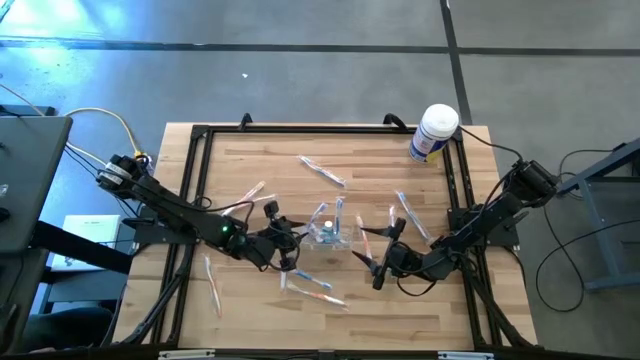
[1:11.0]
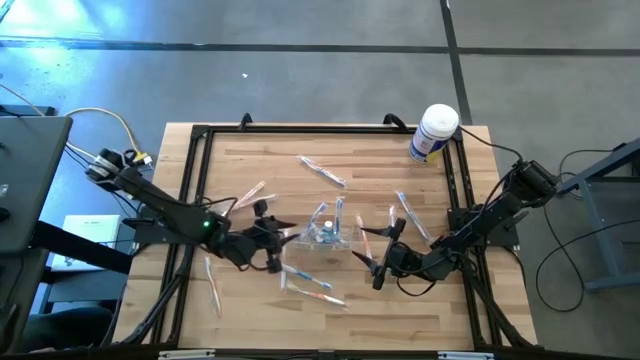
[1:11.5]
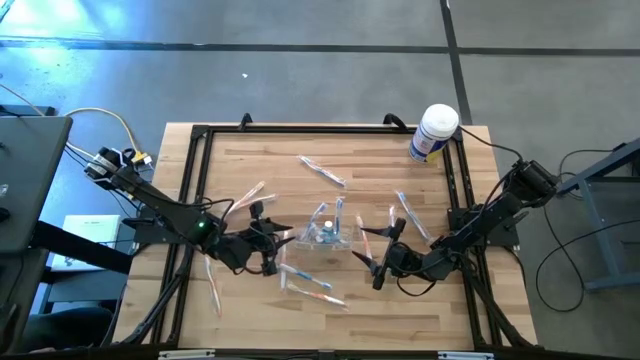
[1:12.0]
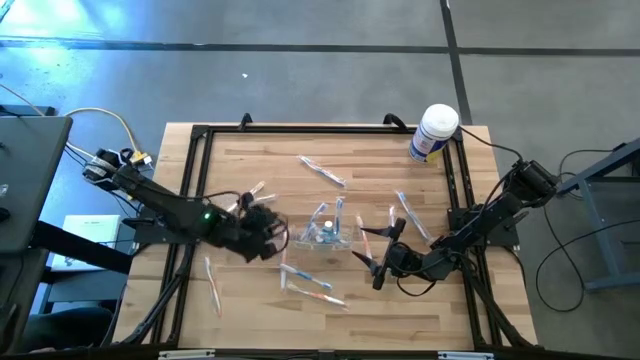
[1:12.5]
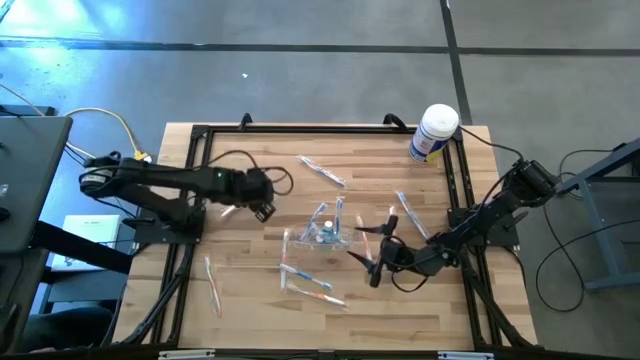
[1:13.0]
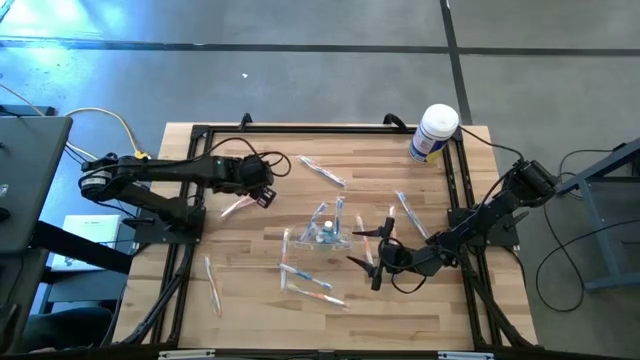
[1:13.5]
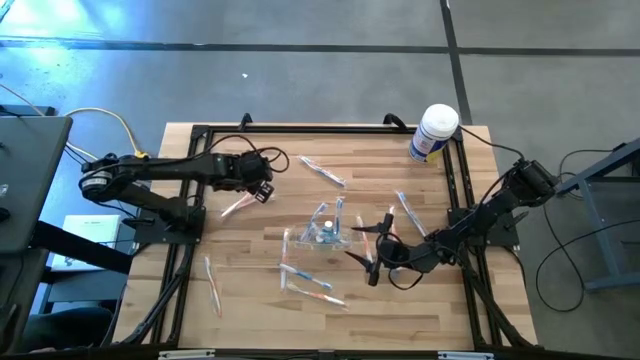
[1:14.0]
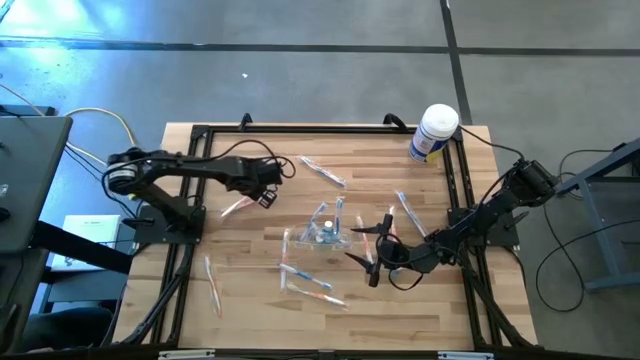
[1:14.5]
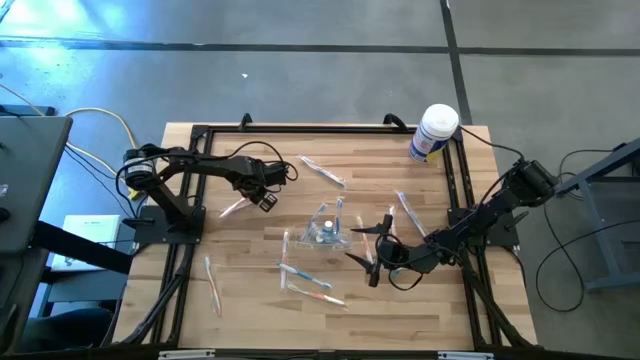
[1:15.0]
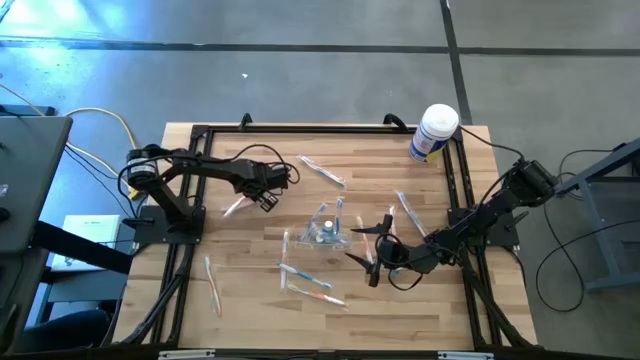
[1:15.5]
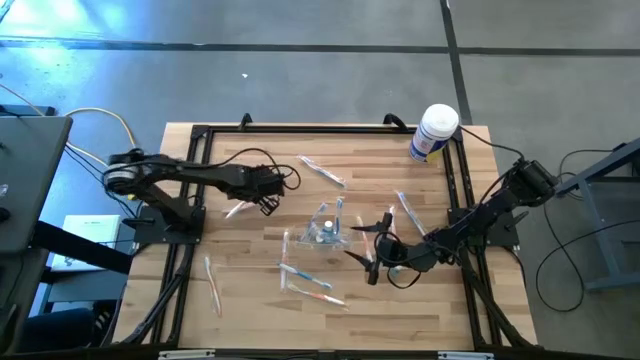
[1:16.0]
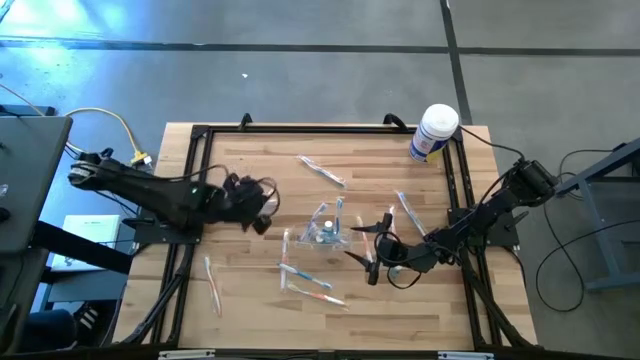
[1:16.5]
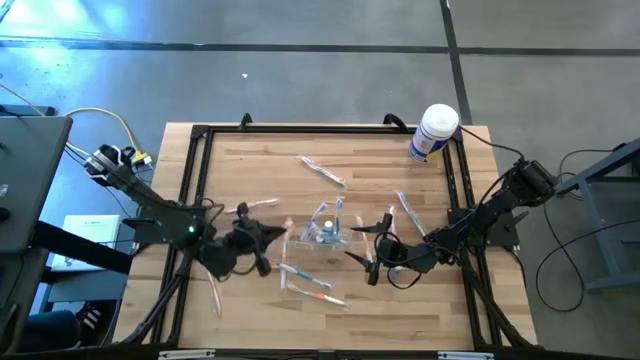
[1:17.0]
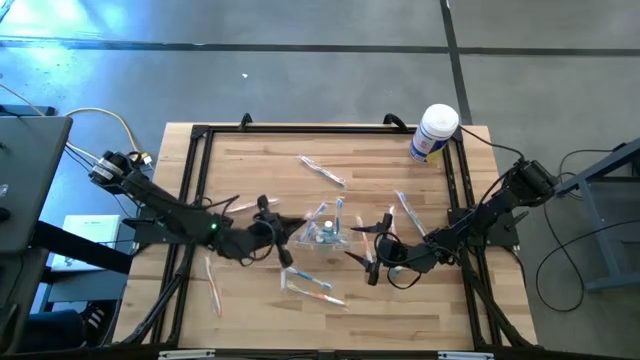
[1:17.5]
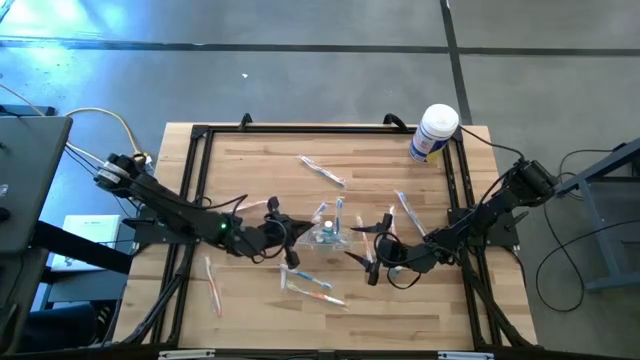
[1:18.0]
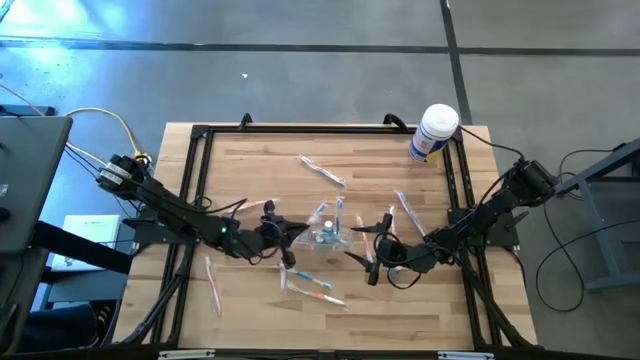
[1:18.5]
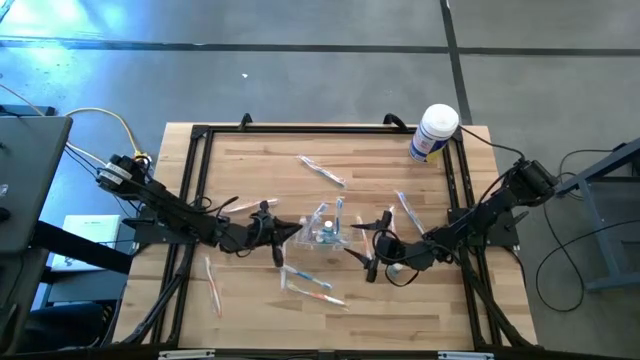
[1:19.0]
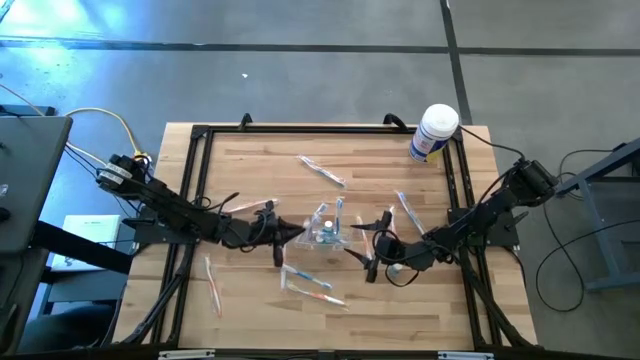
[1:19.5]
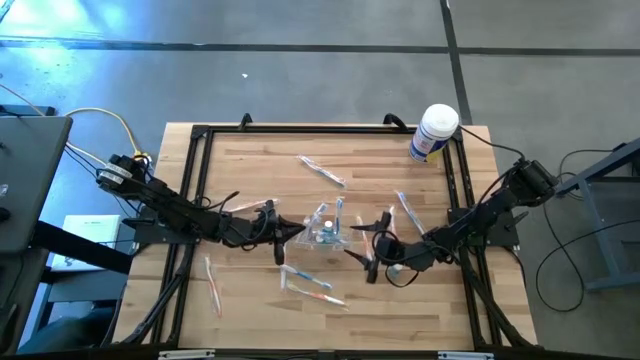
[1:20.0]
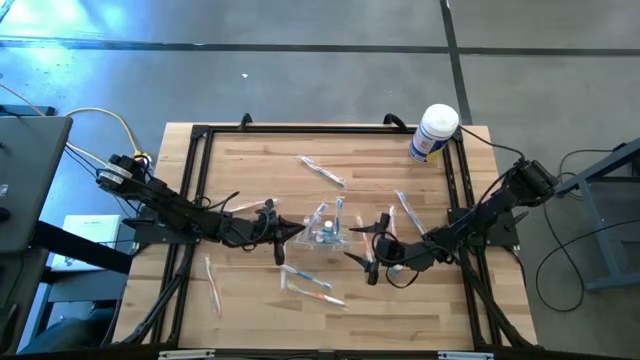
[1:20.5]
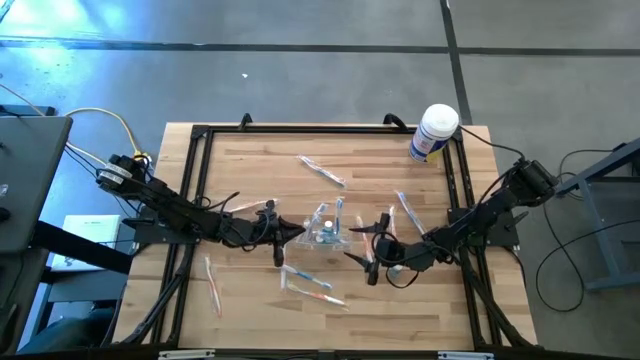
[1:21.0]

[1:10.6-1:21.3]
Task: Pick & Place toothbrushing station
Put the orange toothbrush into the transparent organizer

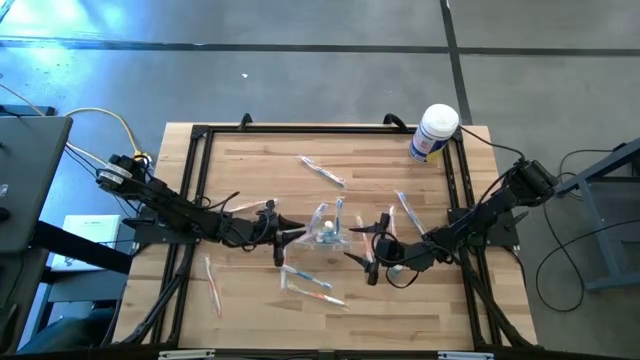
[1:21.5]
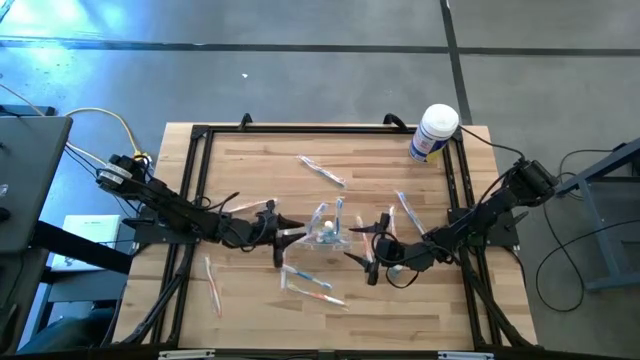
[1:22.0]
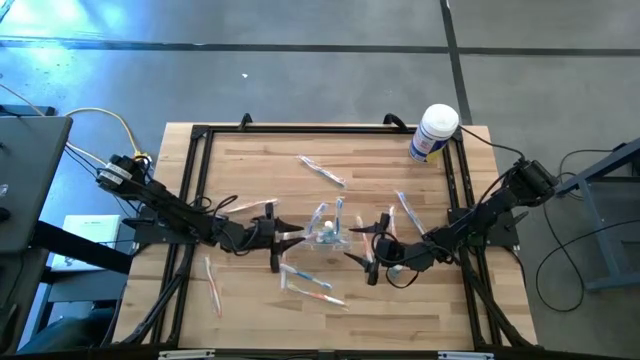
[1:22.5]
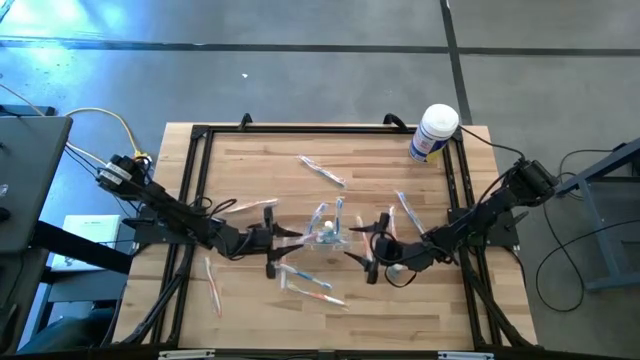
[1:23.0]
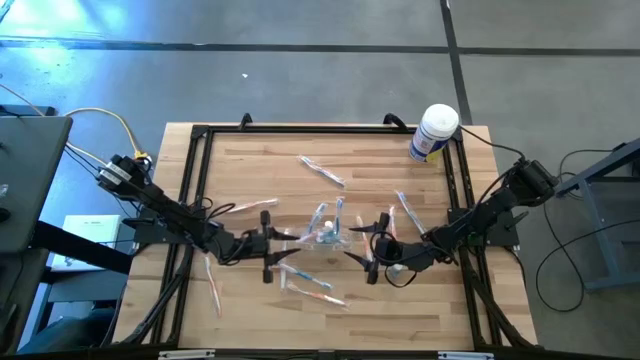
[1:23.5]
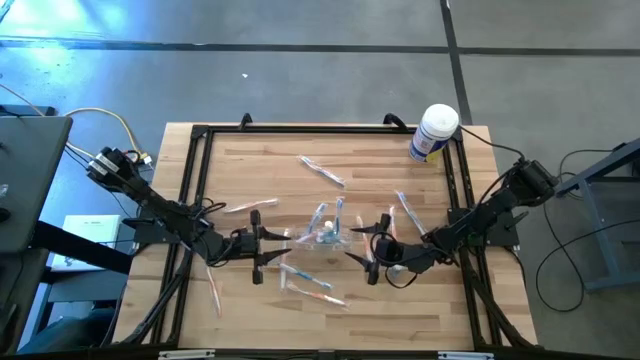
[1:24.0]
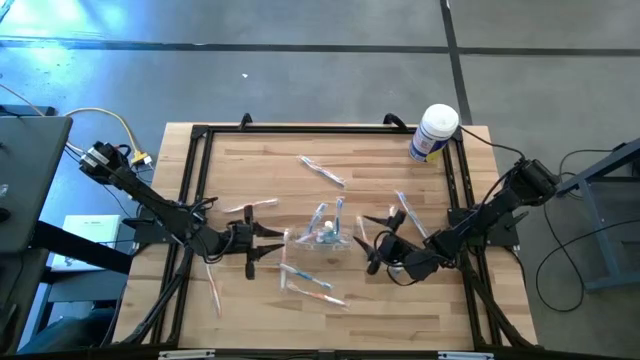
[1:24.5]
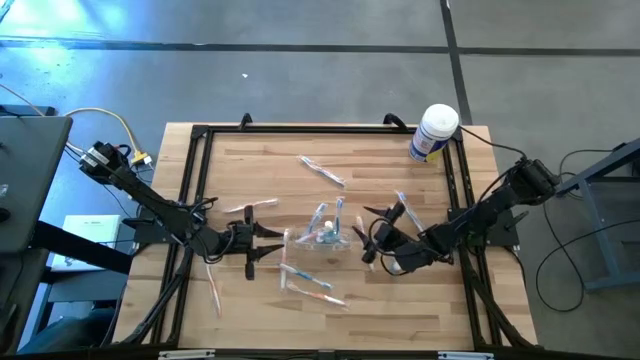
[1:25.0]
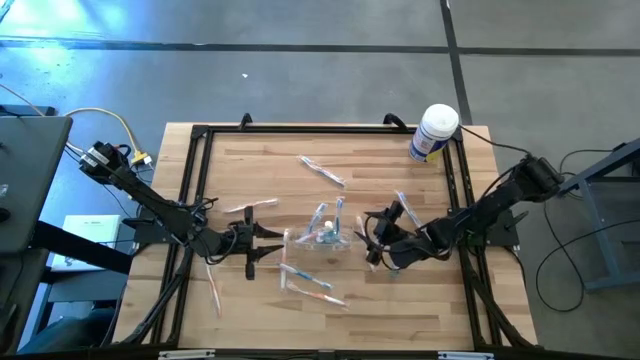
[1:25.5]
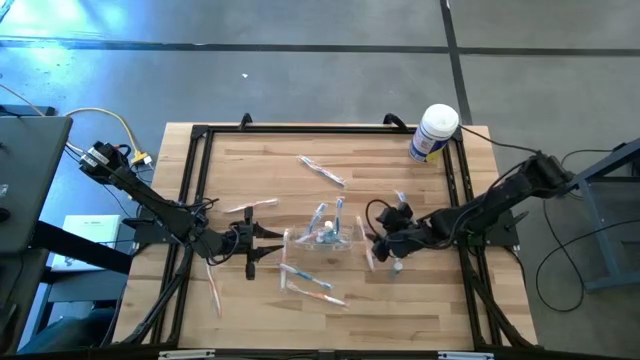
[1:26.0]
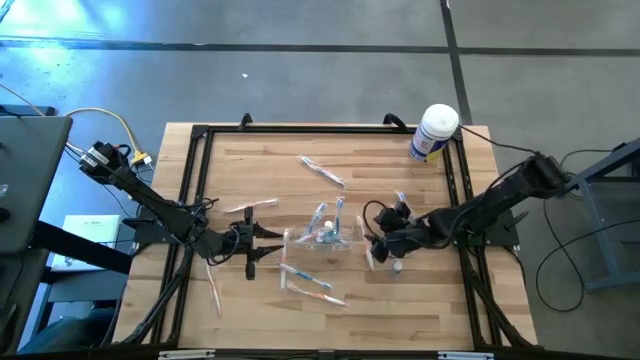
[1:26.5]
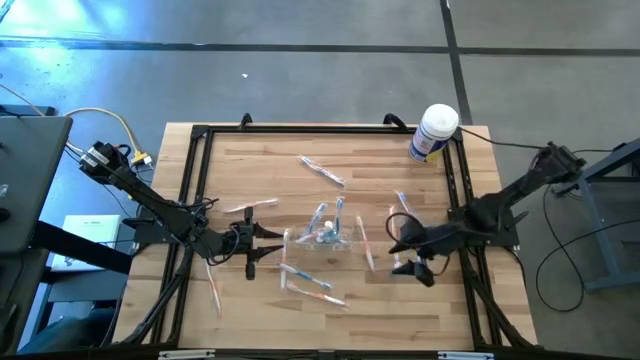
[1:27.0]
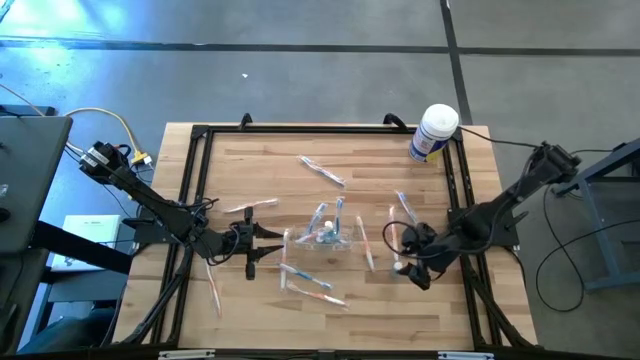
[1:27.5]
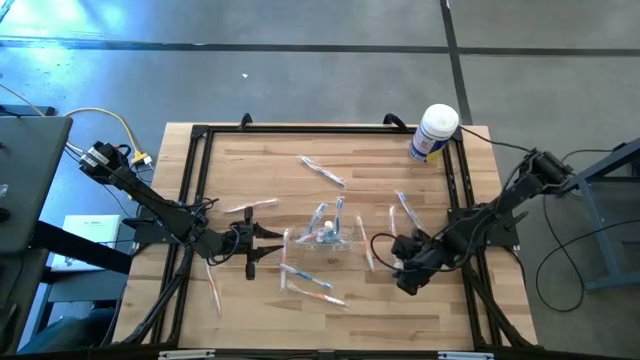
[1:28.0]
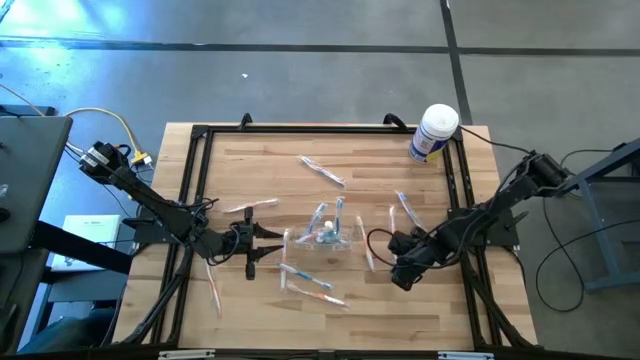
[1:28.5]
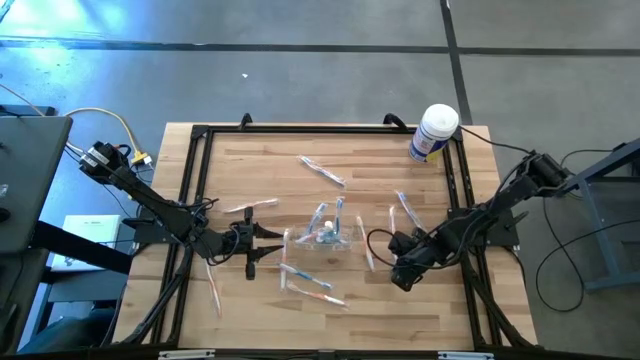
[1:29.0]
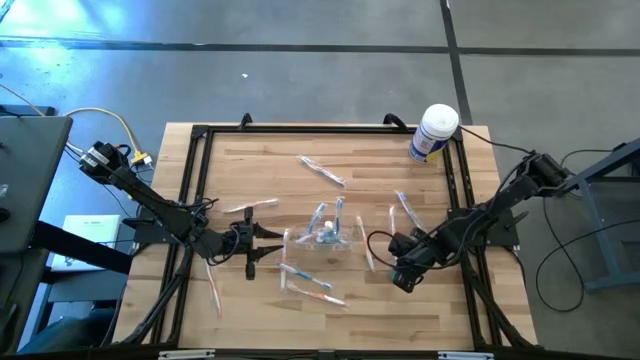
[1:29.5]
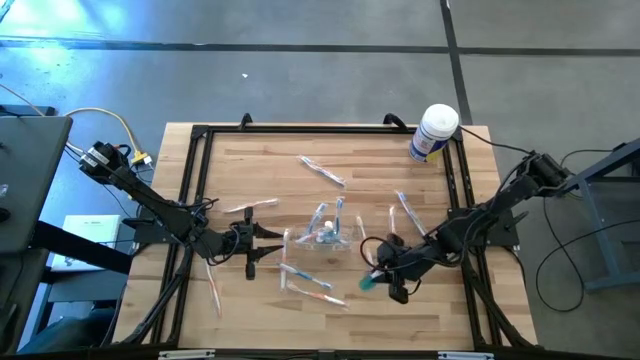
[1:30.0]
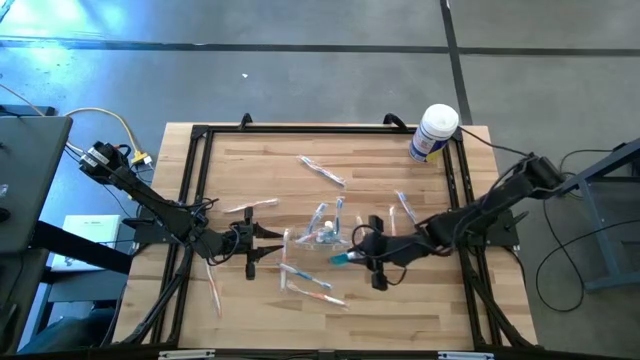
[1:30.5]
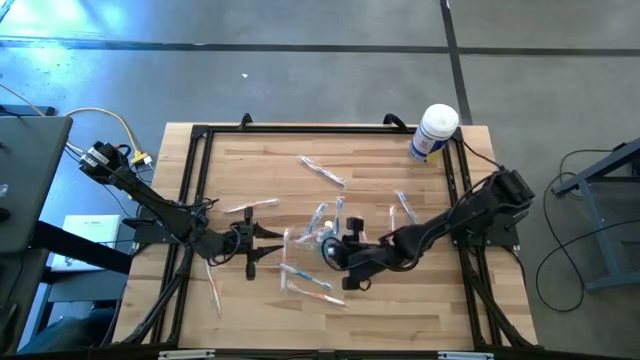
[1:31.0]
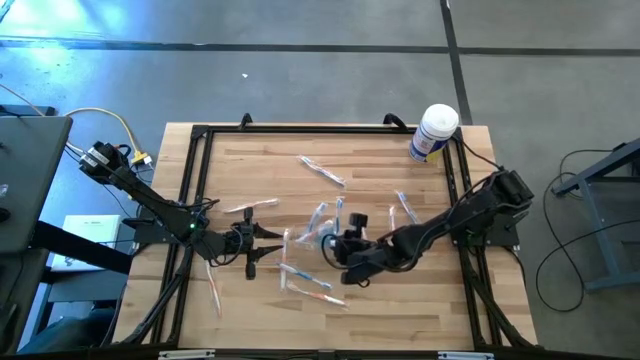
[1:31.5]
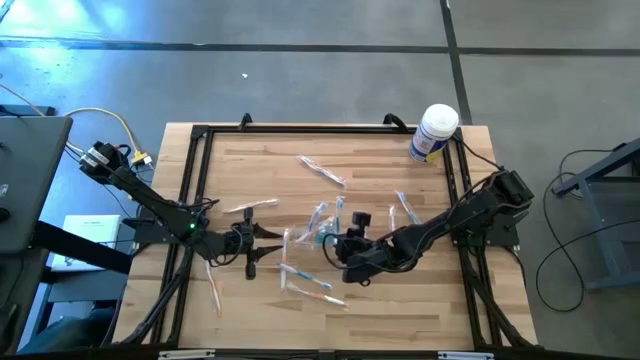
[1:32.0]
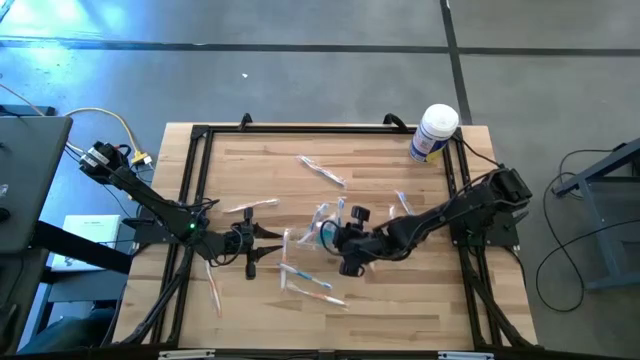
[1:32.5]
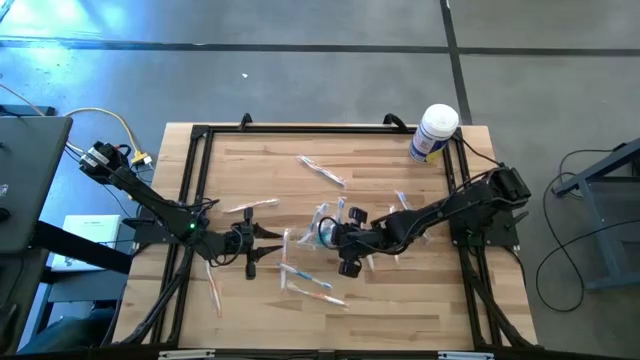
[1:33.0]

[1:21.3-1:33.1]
Put the blue mouthwash bottle into the transparent organizer
